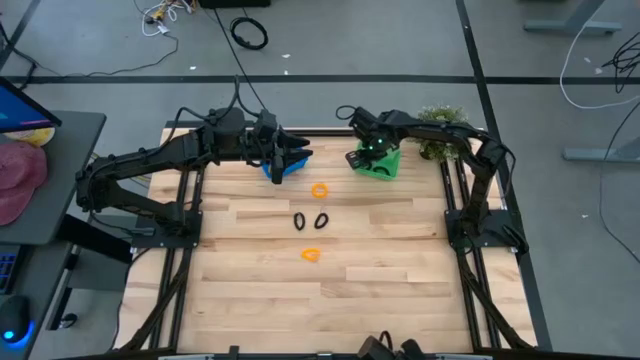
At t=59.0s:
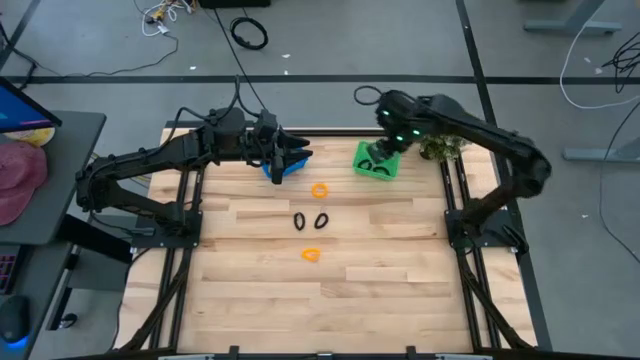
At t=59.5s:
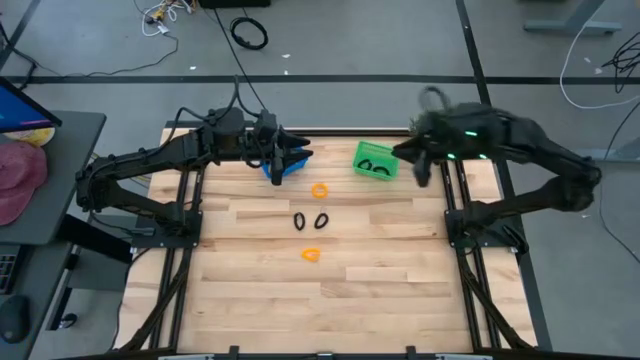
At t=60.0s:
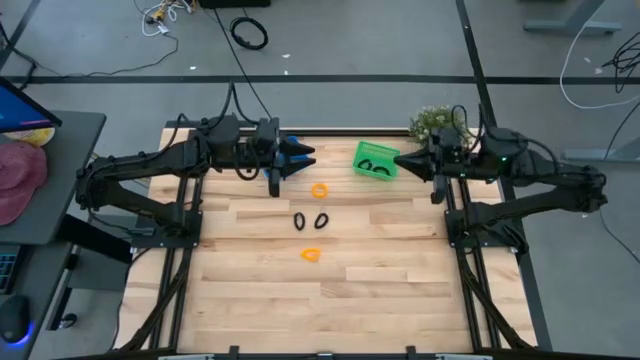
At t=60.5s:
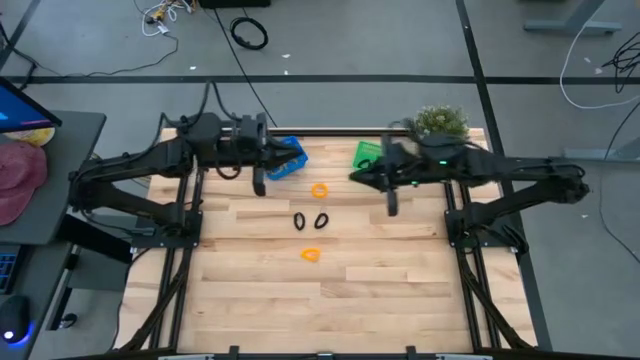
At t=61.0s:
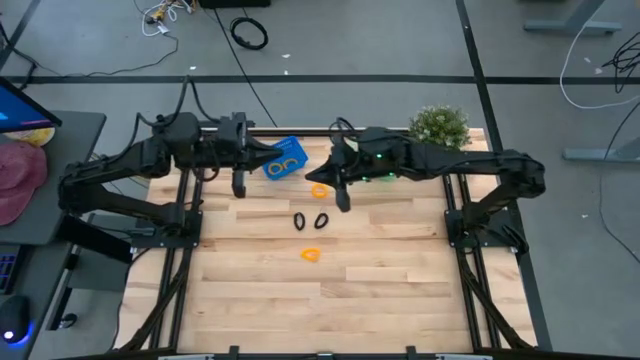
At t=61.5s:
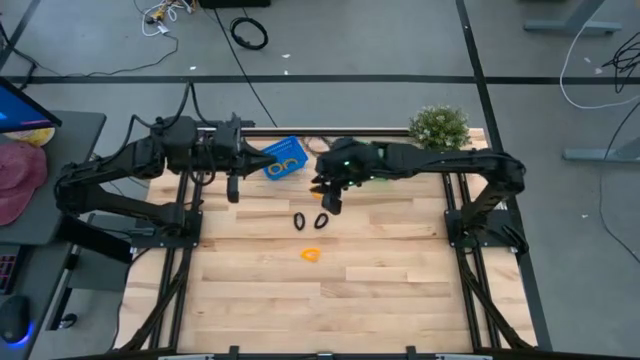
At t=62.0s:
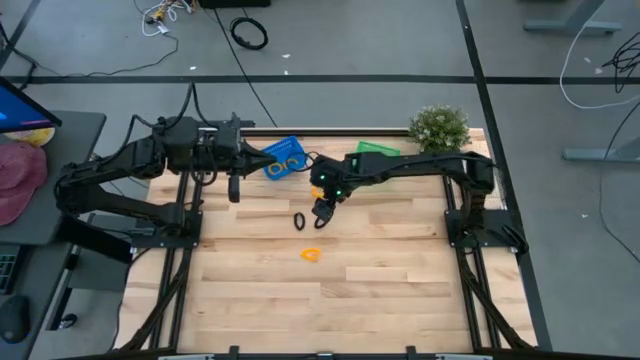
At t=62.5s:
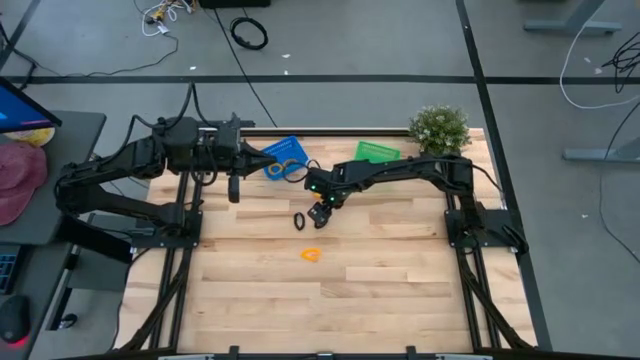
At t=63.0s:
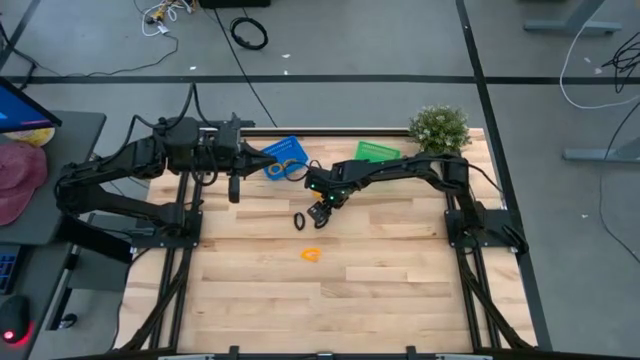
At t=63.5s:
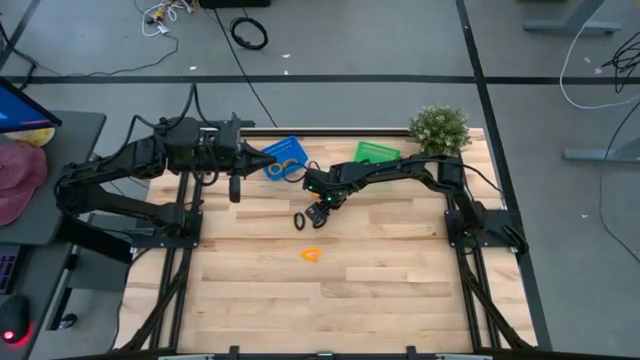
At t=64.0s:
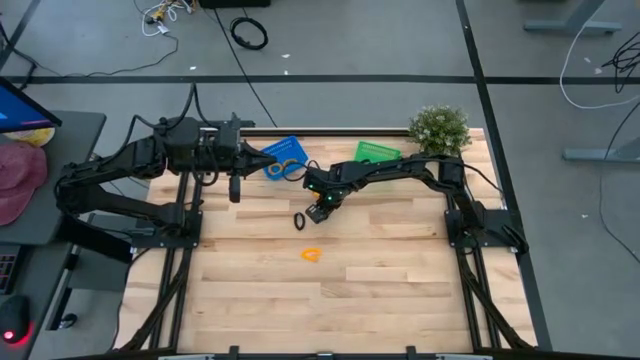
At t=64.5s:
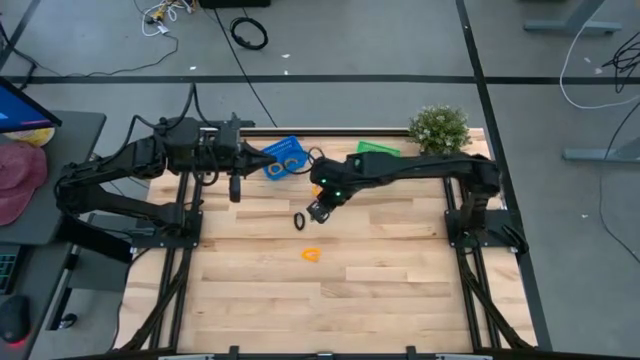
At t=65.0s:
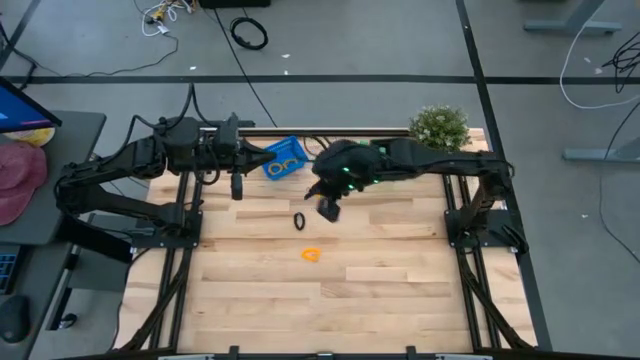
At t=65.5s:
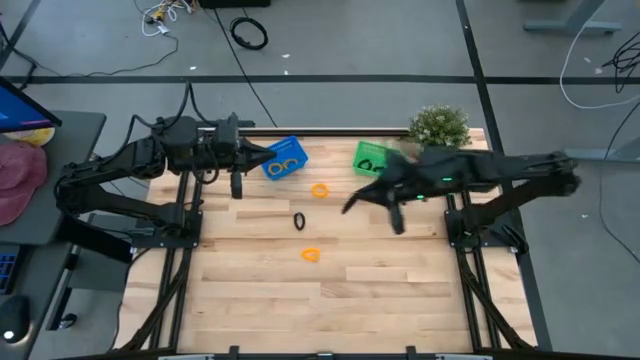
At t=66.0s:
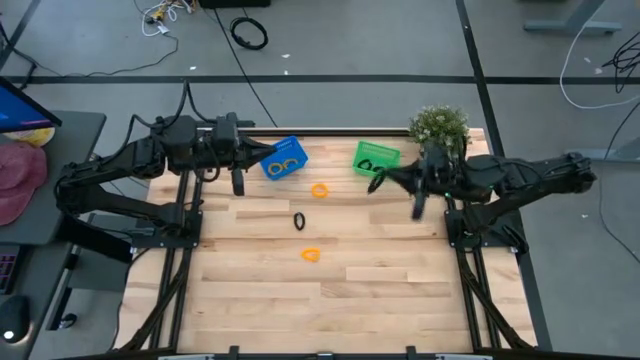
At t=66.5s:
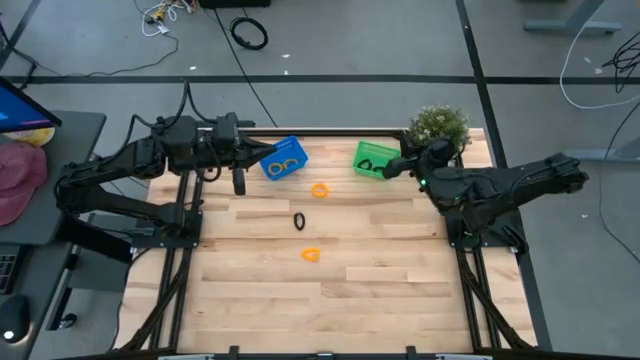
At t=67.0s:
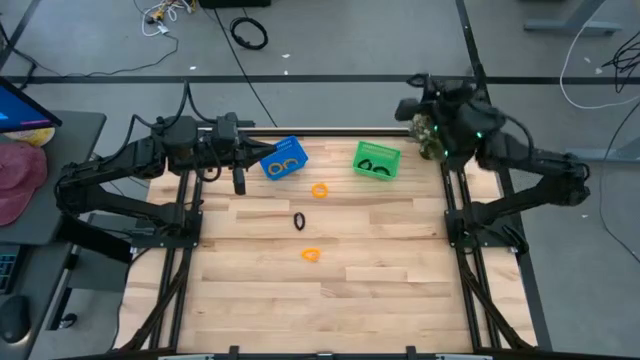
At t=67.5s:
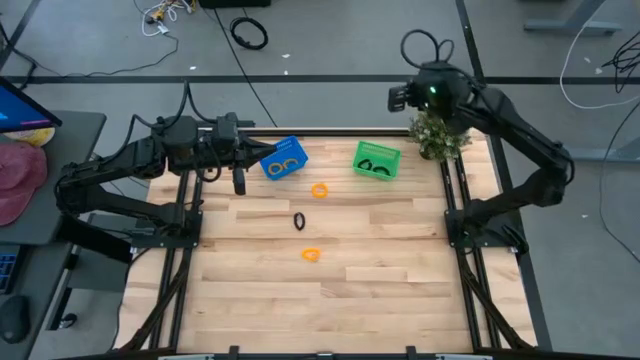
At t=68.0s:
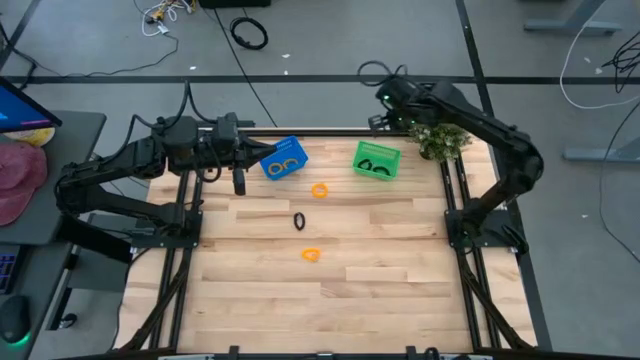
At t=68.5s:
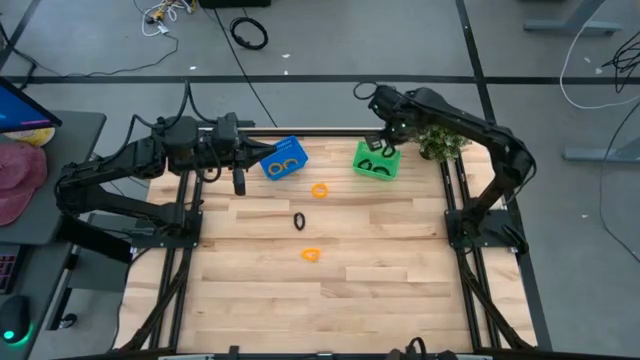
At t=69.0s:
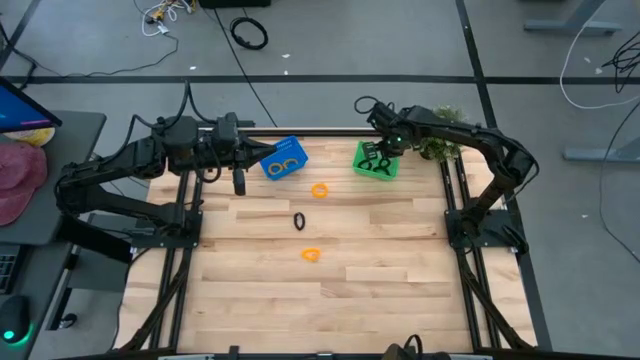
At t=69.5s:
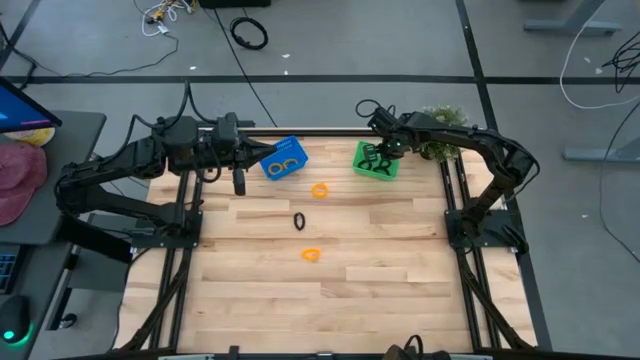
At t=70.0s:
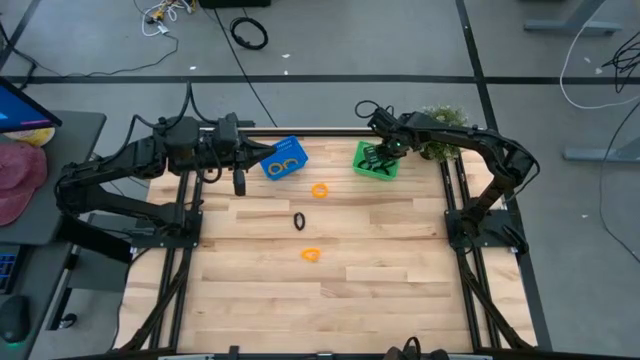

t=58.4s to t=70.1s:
Task: Sort spring keychains
Put the black spring keychain into the green bin

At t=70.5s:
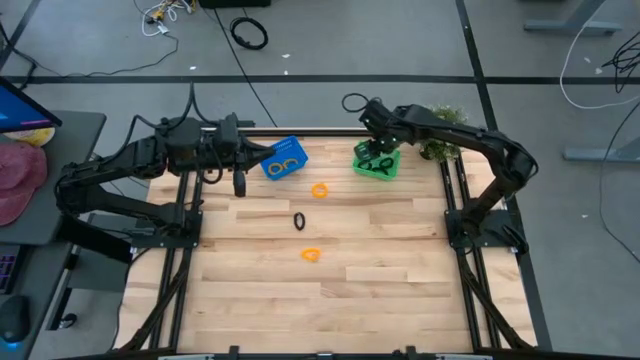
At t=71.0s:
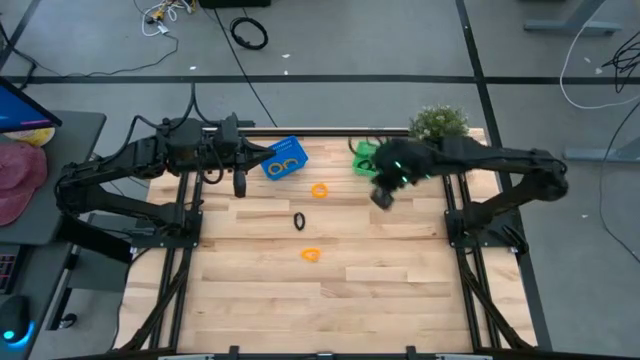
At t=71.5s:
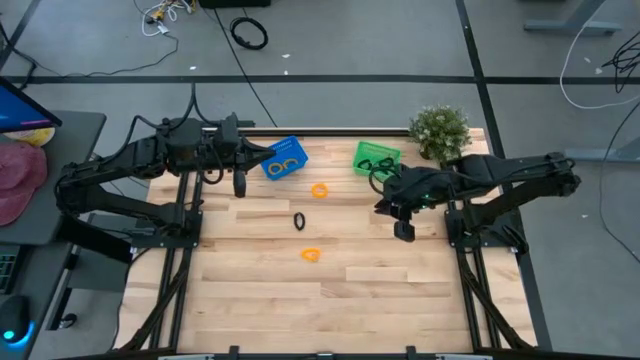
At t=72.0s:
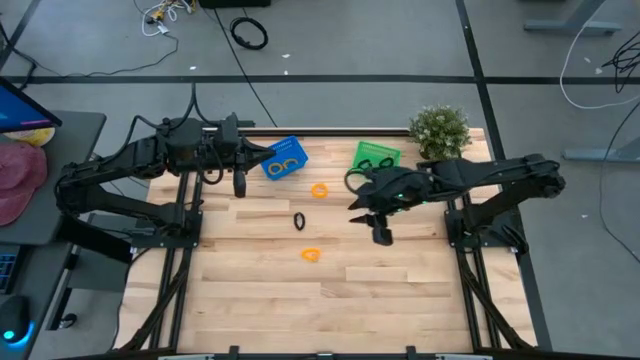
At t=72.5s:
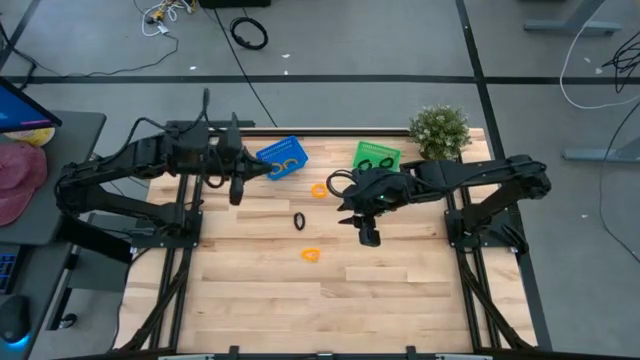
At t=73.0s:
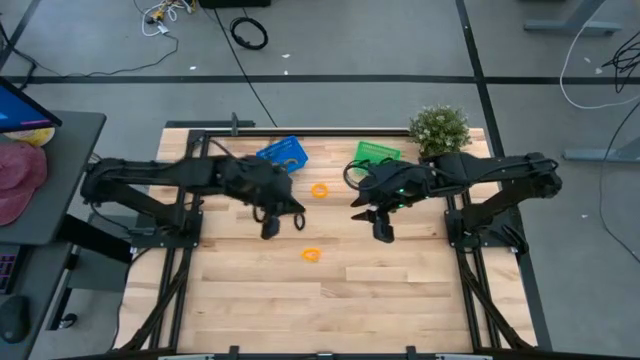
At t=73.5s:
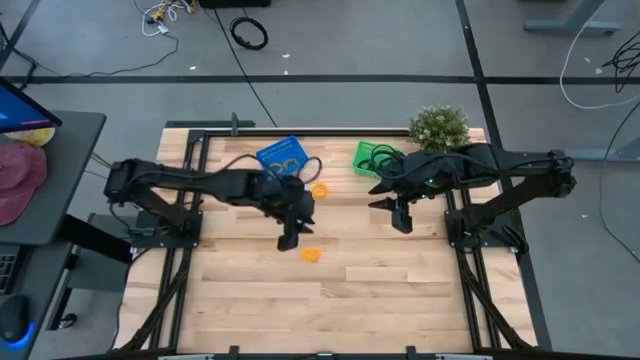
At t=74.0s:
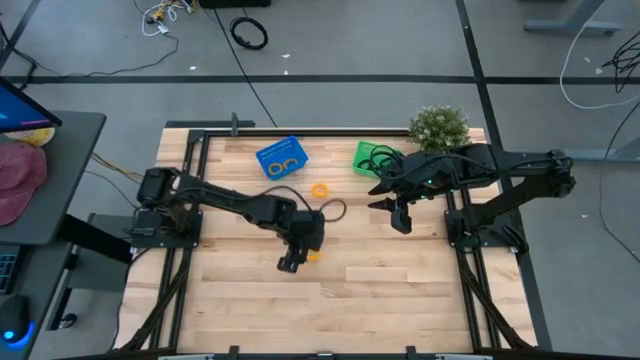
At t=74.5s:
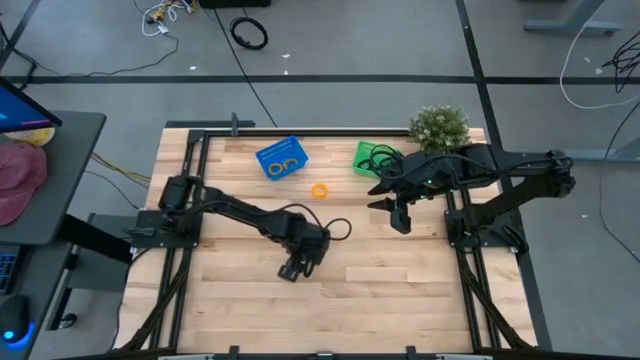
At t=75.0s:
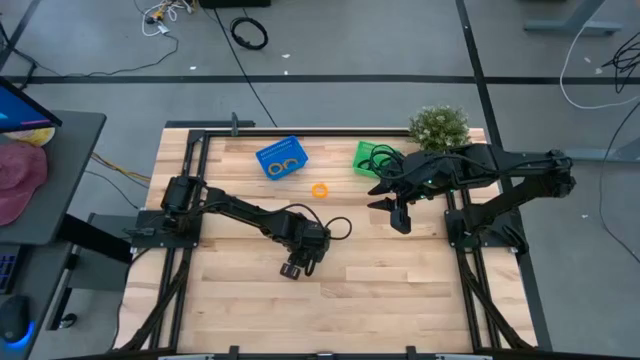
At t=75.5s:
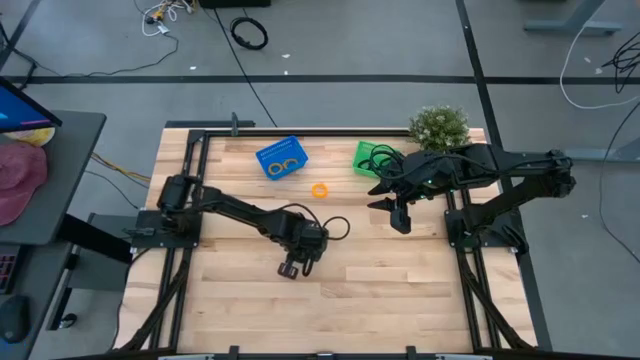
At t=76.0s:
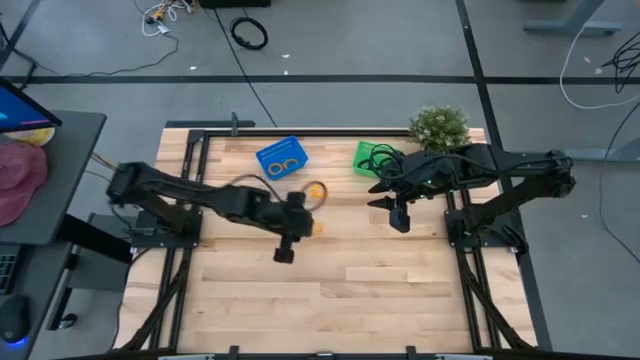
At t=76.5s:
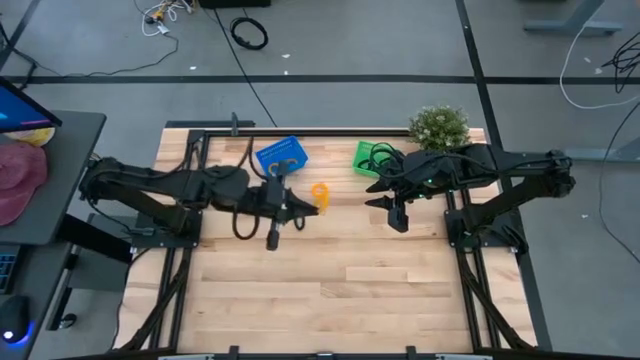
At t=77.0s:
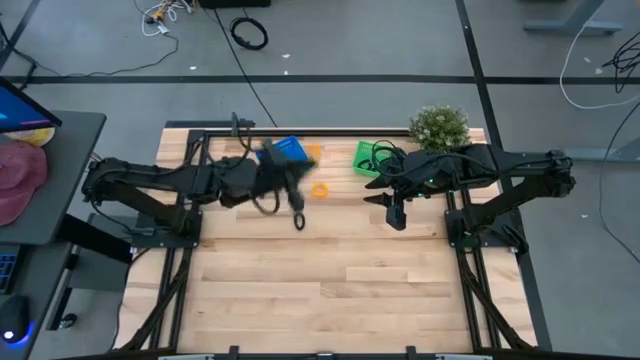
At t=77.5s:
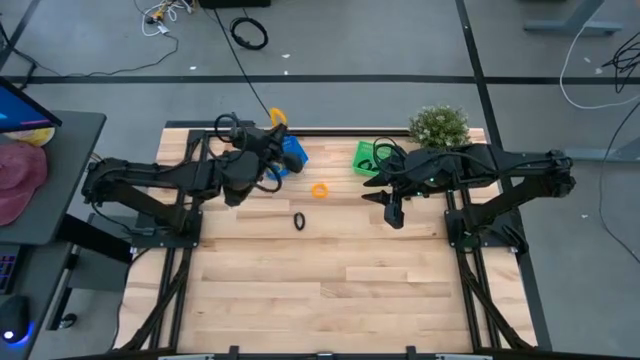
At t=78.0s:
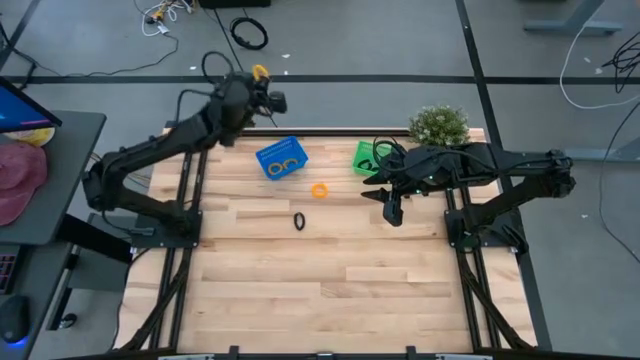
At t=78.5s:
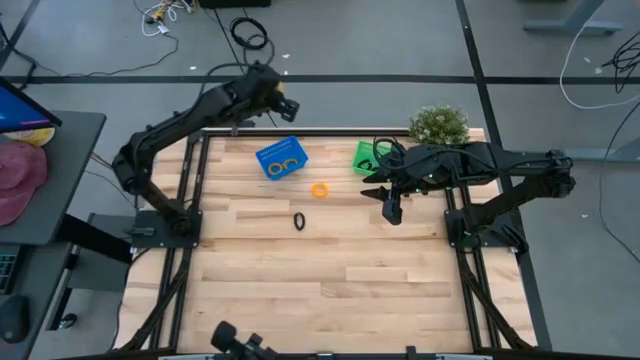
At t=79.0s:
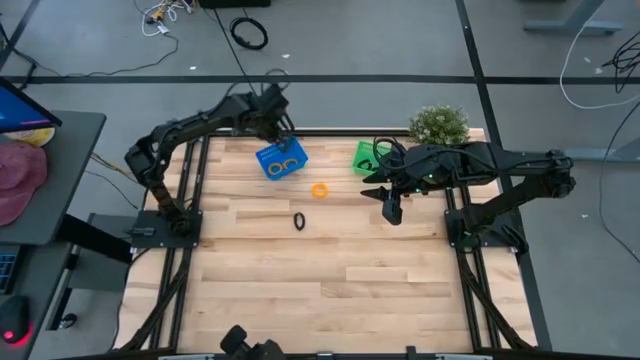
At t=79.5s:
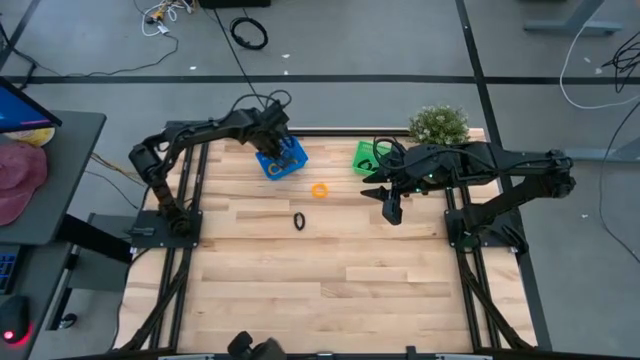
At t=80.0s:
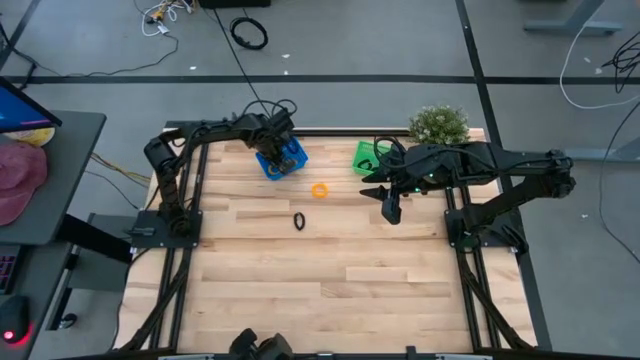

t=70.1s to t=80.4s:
Put the yellow spring keychain into the blue bin
